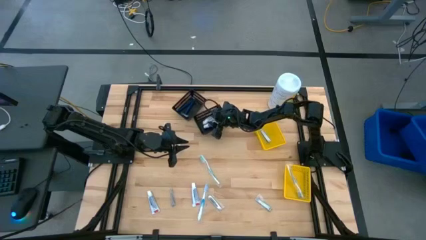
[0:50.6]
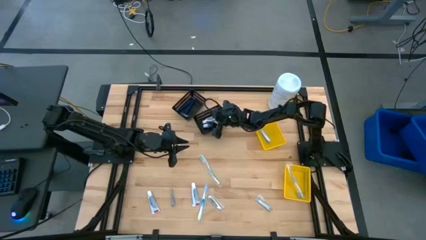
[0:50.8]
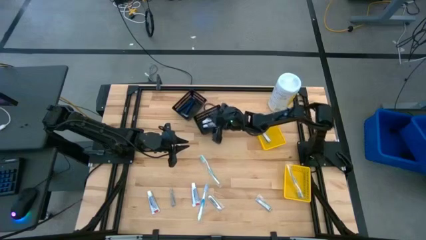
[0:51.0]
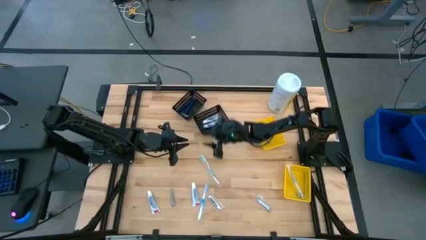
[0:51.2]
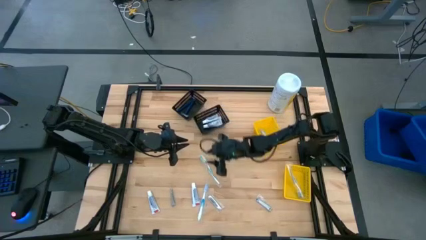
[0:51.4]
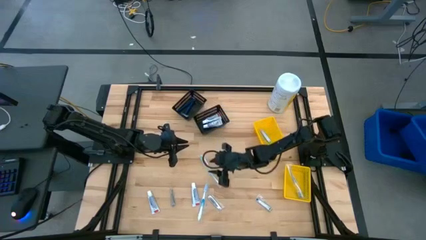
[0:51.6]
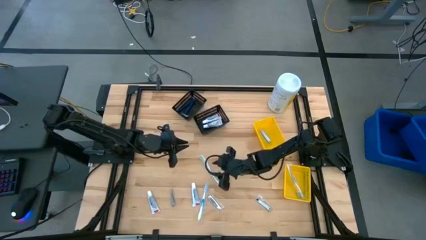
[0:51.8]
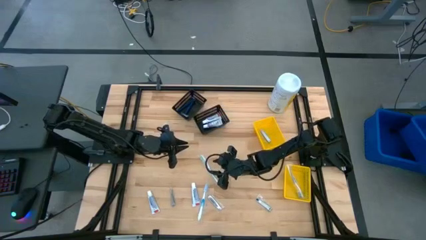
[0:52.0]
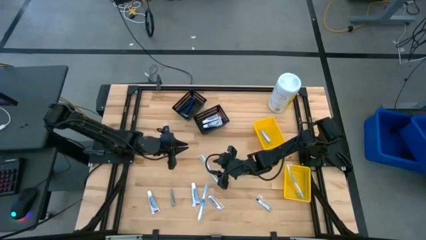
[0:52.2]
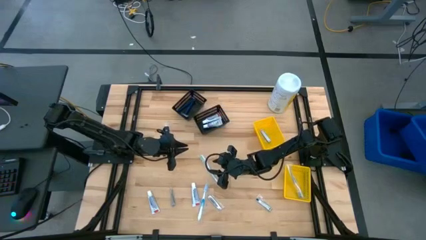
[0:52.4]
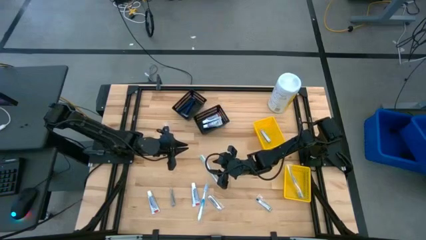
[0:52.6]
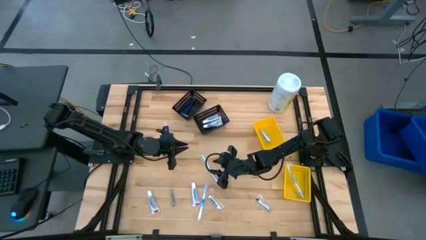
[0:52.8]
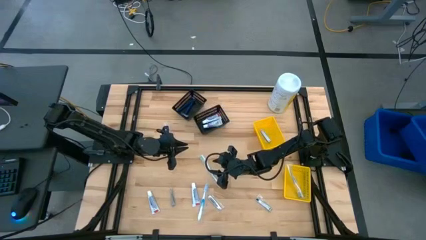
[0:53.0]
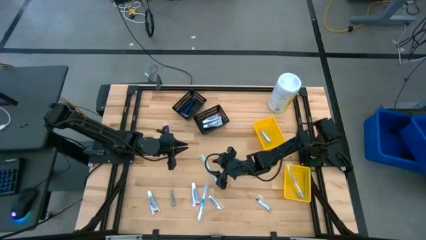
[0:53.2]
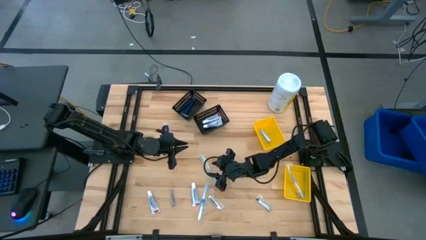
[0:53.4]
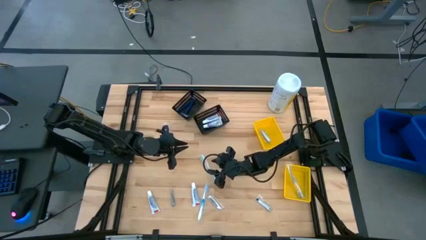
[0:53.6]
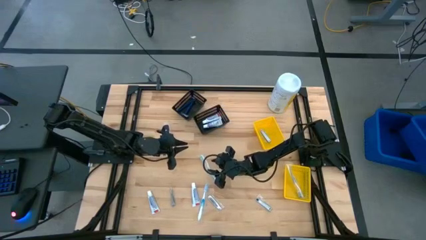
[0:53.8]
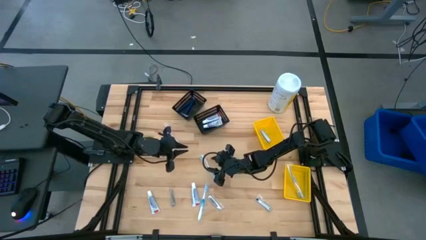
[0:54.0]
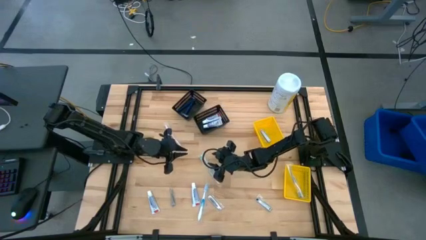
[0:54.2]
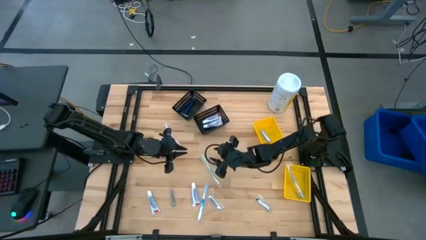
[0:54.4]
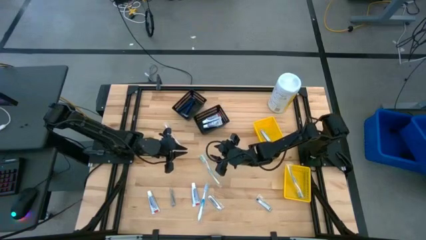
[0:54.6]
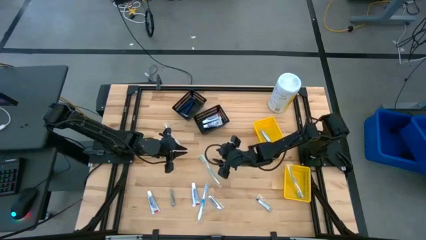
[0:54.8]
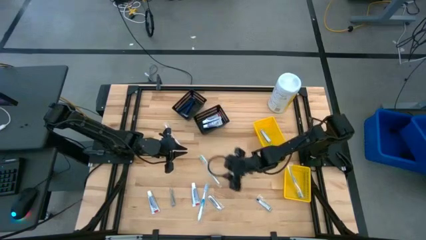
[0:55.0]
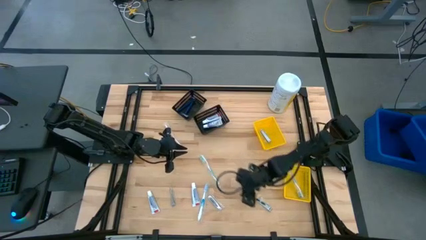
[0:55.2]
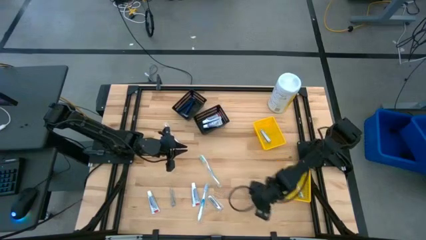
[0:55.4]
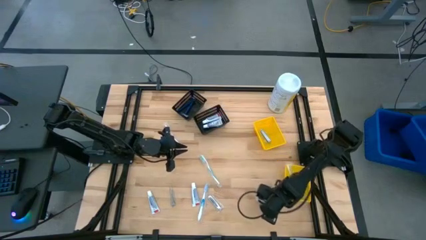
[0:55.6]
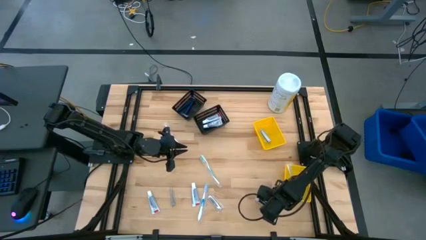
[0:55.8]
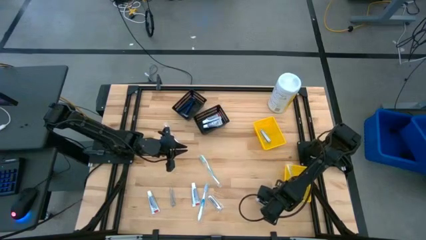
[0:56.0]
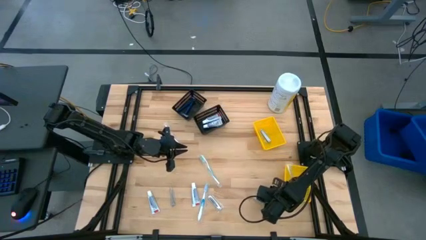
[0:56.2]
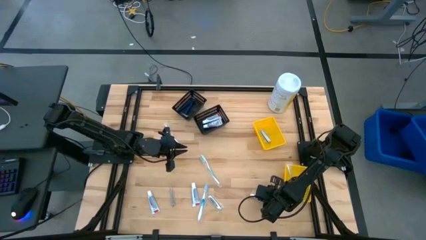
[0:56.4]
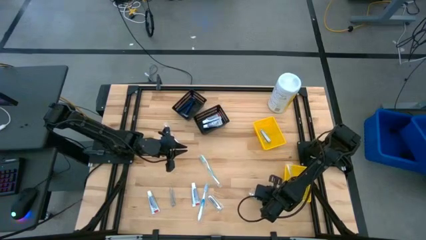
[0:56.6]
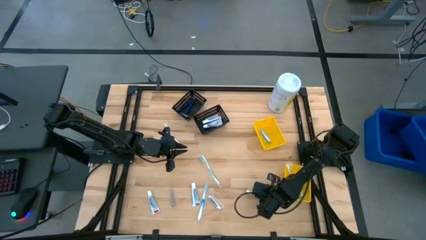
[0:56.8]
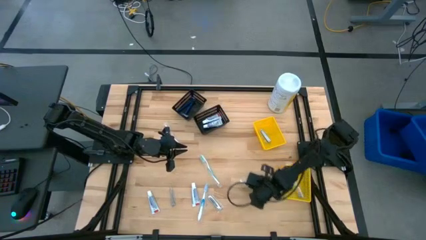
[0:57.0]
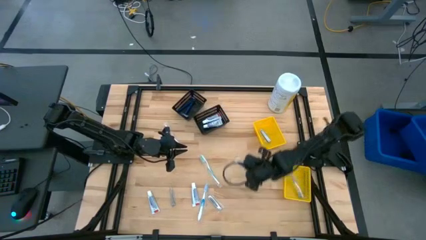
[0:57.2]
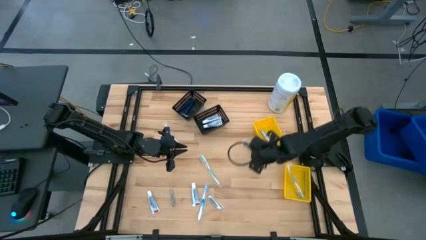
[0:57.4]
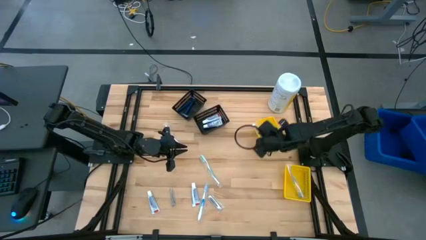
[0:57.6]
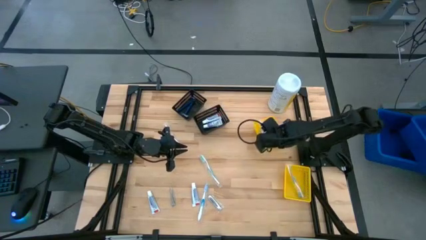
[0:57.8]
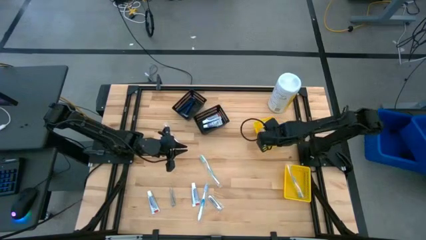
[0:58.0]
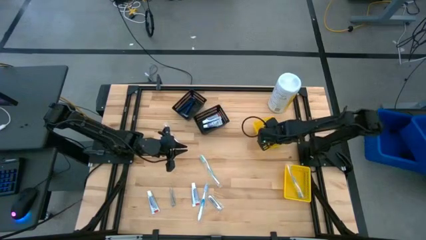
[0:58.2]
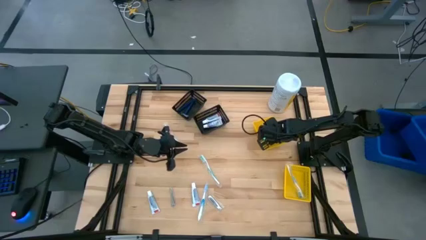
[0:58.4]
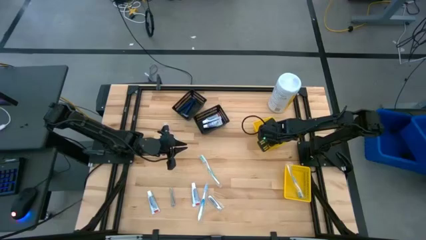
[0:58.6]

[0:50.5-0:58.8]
Task: Pick & Place Travel size toiletries
Put the nail cutter into the top yellow bin

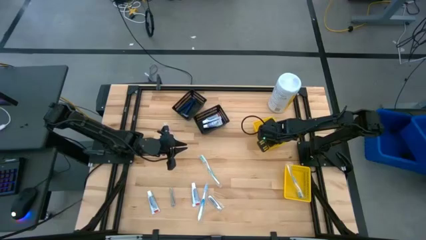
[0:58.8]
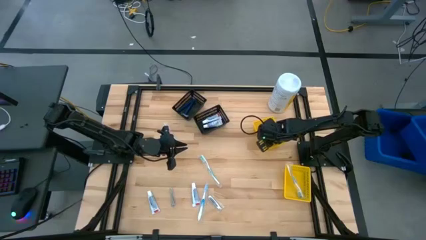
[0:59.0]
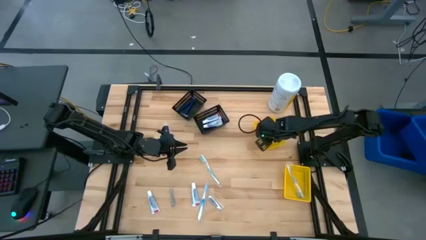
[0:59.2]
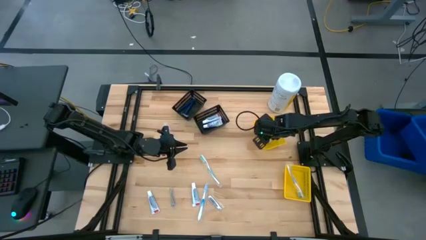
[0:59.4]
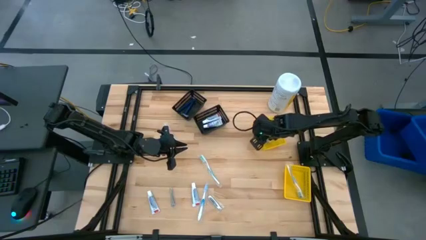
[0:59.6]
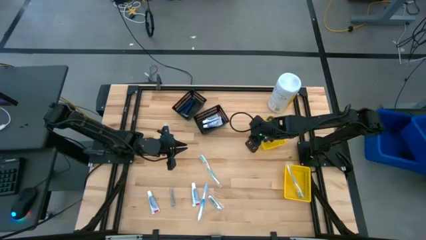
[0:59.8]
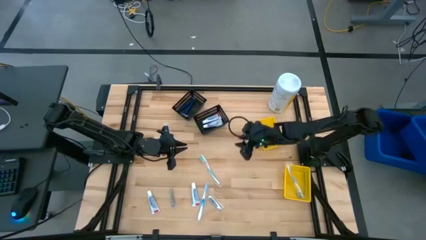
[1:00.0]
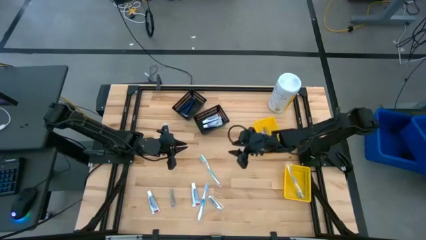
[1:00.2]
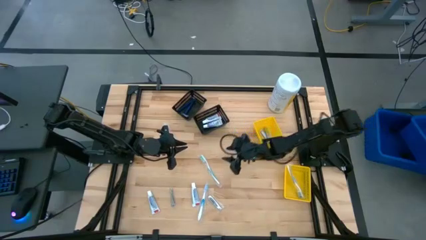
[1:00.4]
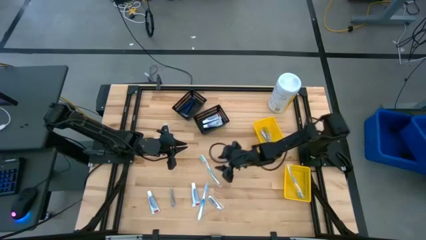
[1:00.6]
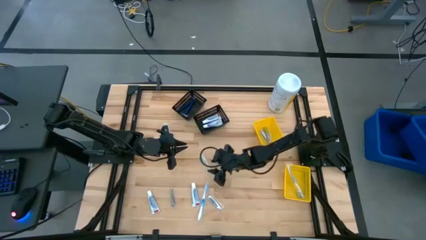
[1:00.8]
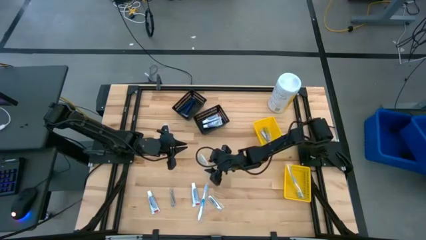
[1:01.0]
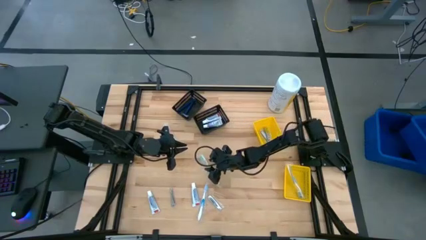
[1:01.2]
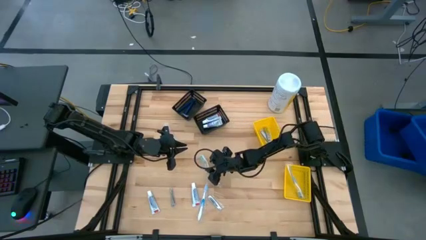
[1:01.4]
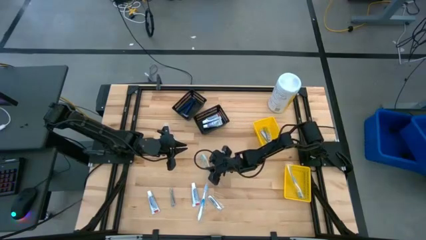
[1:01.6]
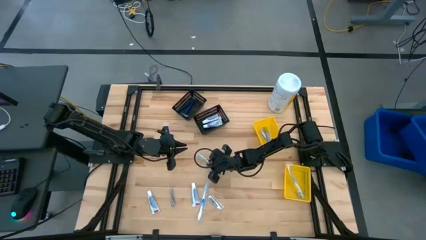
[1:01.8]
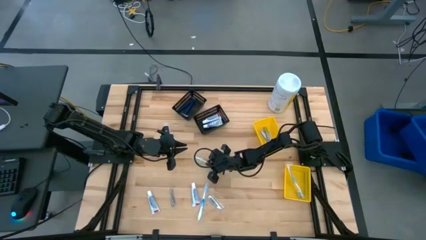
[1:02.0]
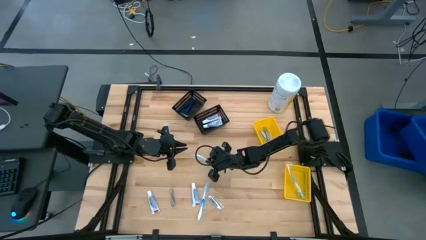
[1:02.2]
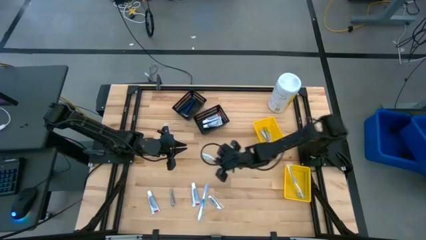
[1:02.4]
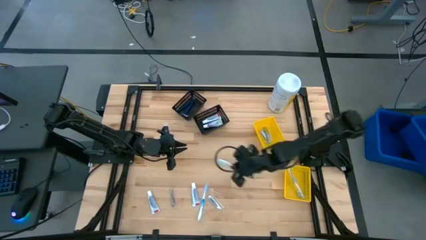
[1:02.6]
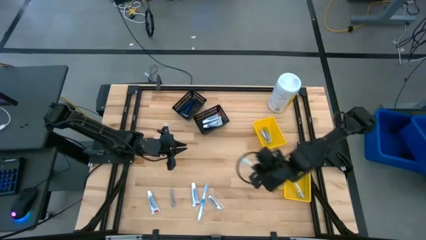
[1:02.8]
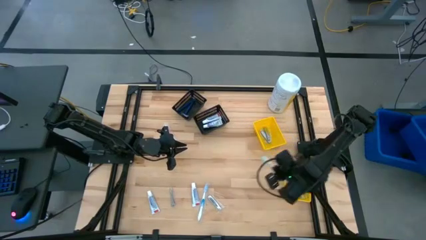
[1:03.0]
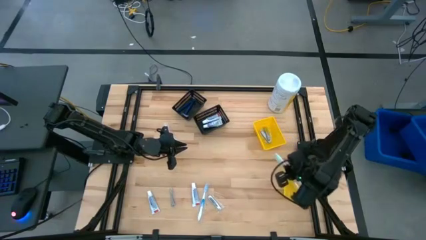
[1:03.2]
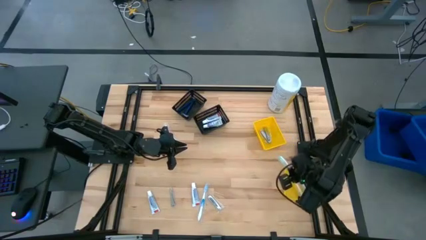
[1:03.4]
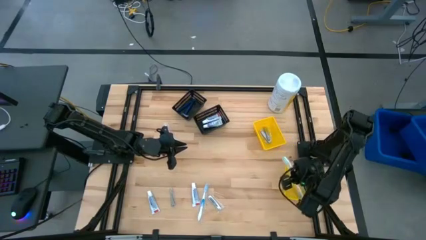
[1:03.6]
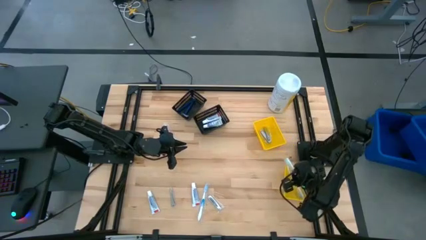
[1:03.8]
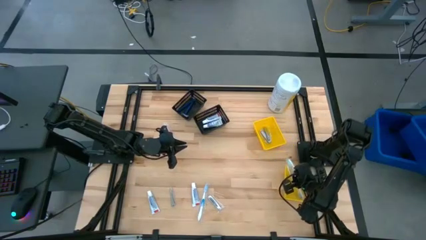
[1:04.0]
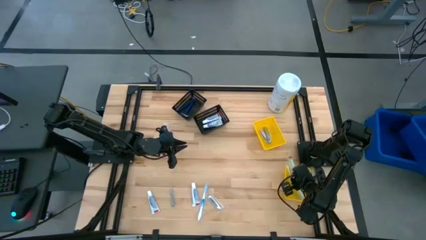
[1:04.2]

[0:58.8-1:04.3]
Put the green toothbrush into the bottom yellow bin
